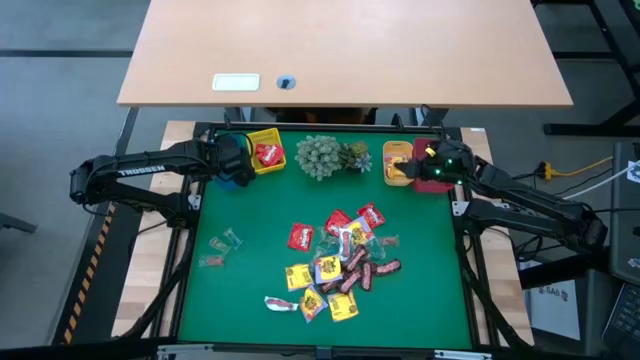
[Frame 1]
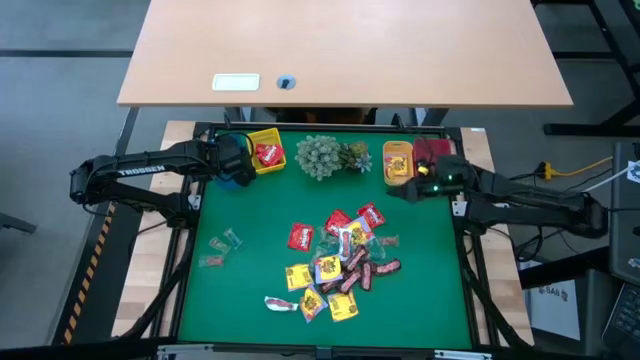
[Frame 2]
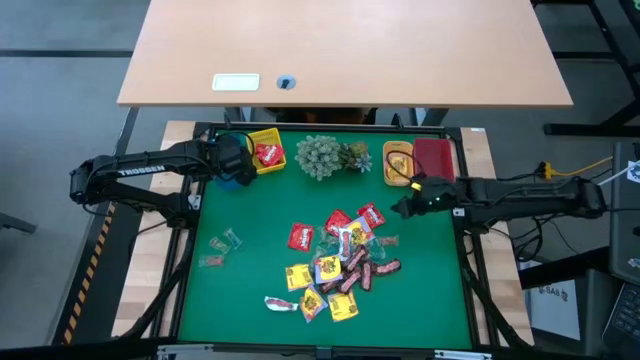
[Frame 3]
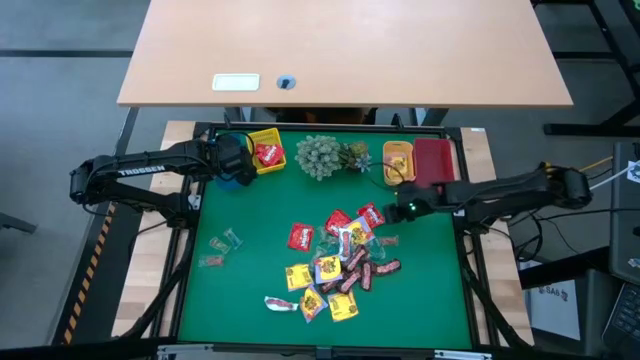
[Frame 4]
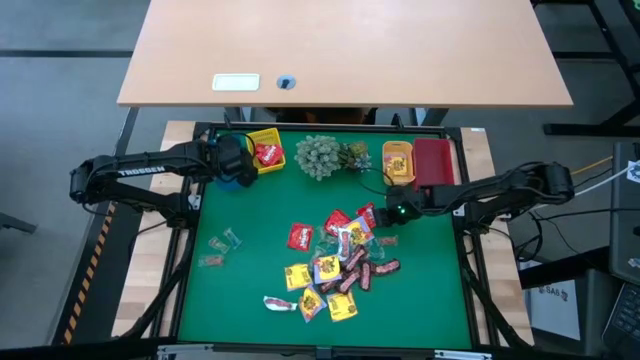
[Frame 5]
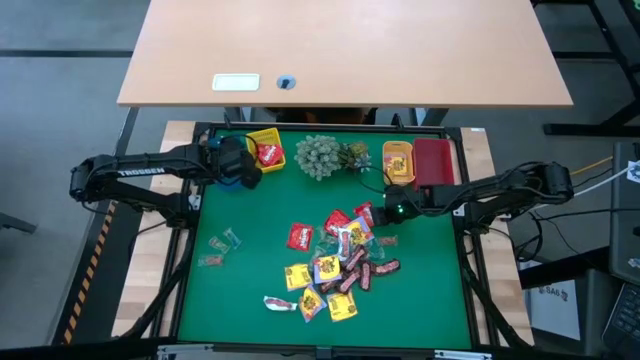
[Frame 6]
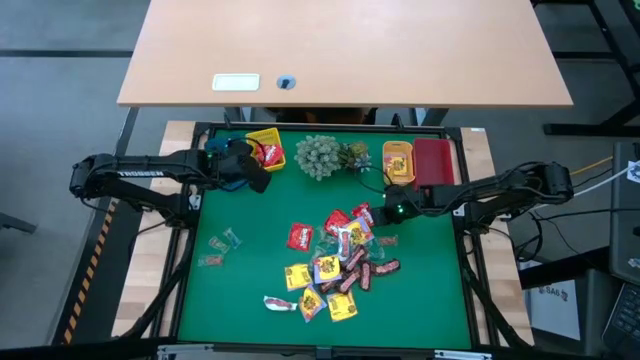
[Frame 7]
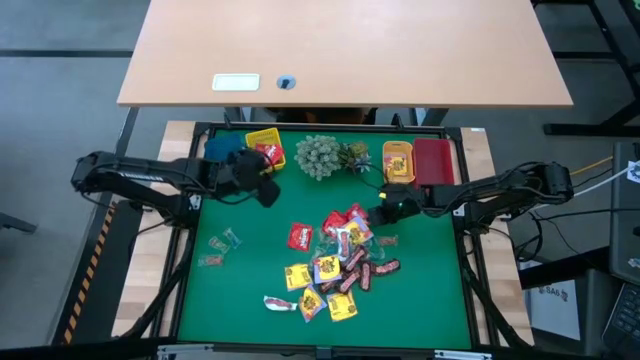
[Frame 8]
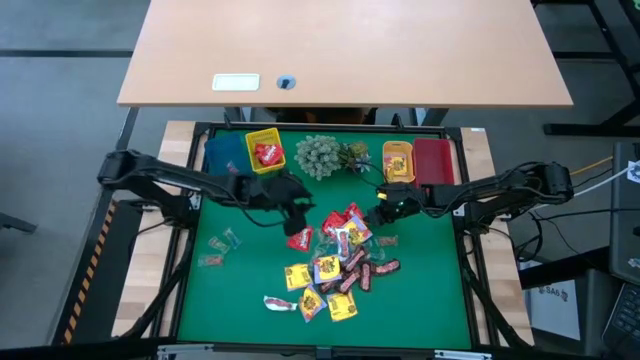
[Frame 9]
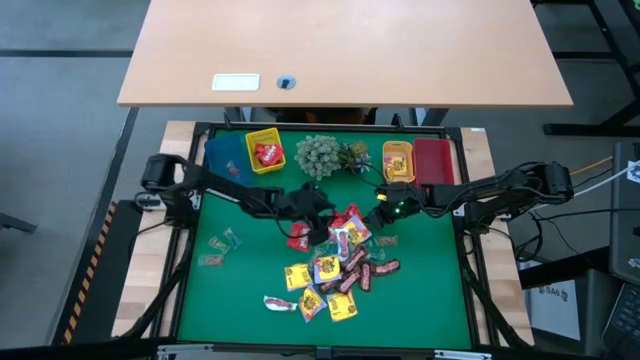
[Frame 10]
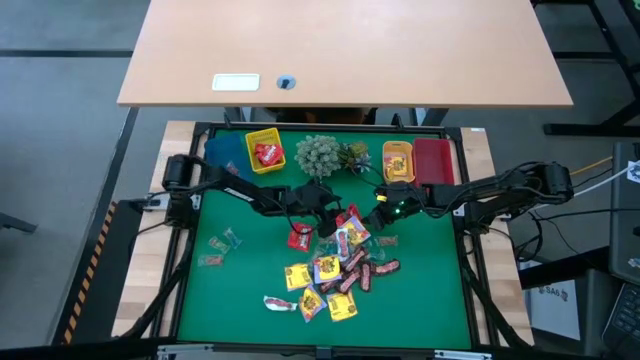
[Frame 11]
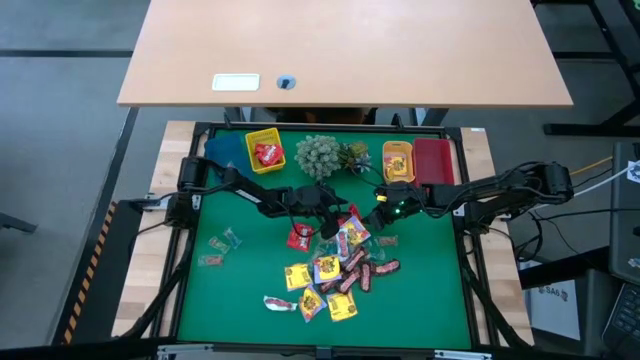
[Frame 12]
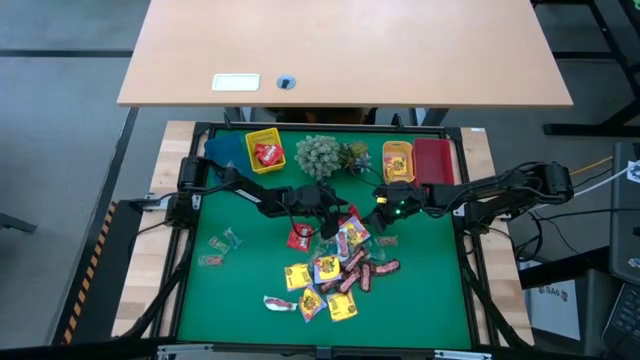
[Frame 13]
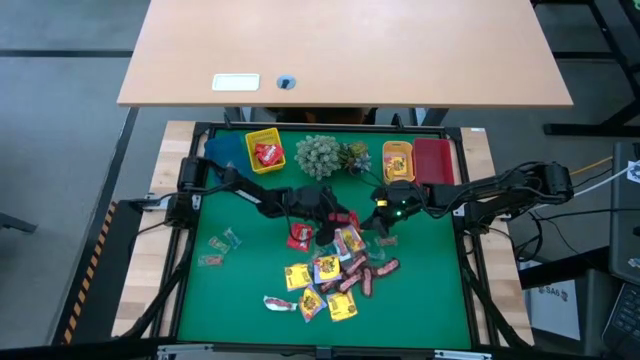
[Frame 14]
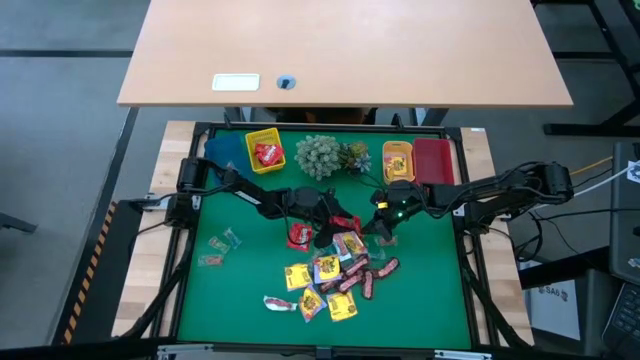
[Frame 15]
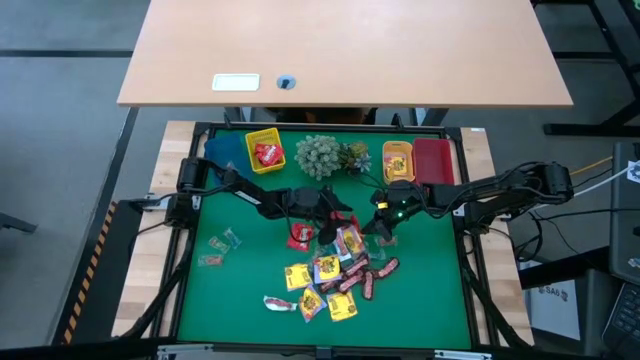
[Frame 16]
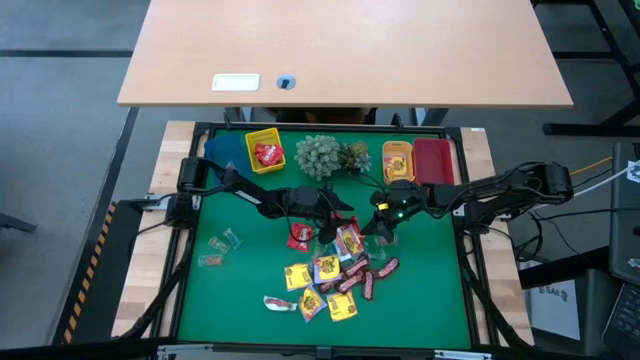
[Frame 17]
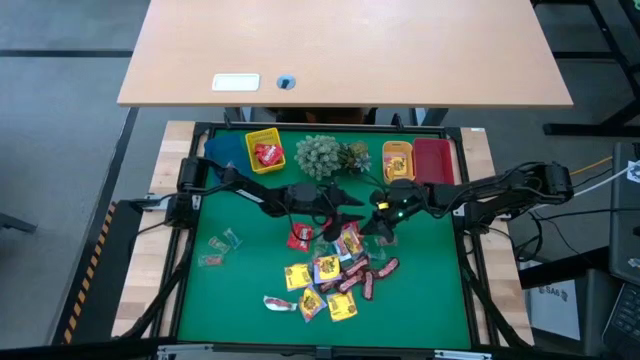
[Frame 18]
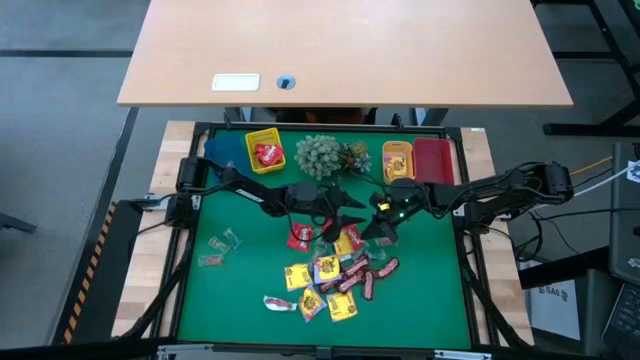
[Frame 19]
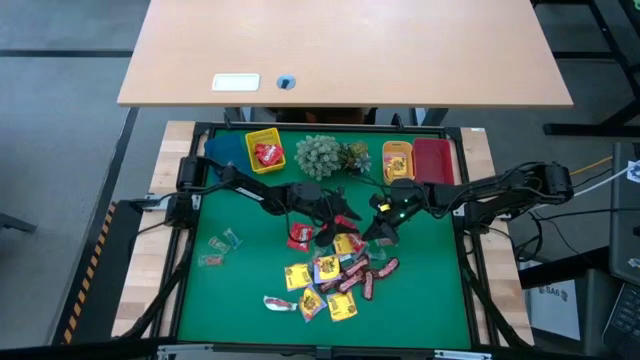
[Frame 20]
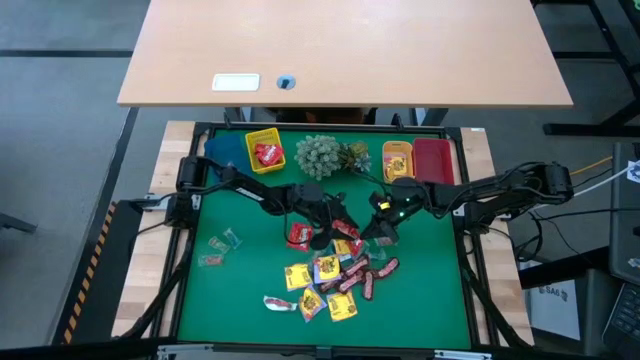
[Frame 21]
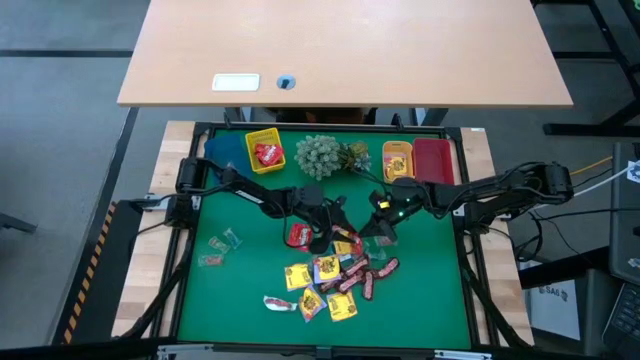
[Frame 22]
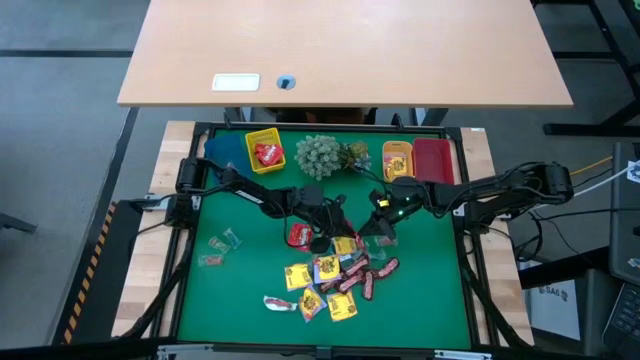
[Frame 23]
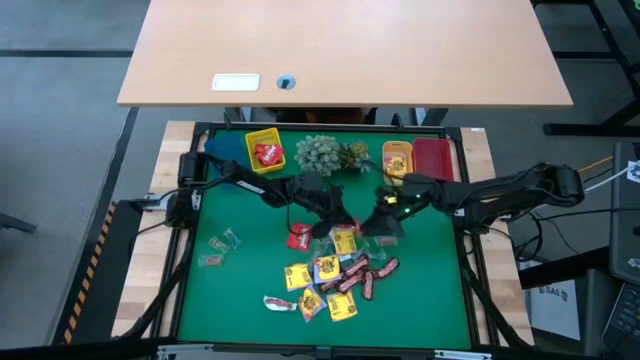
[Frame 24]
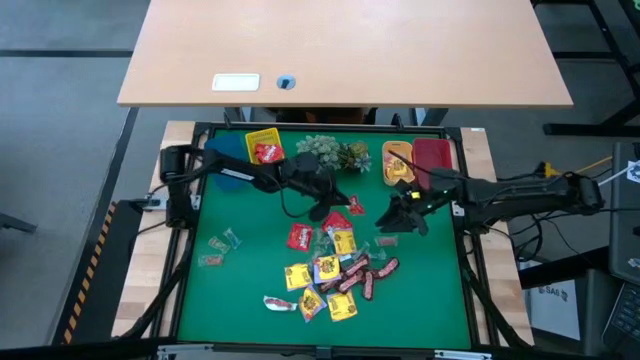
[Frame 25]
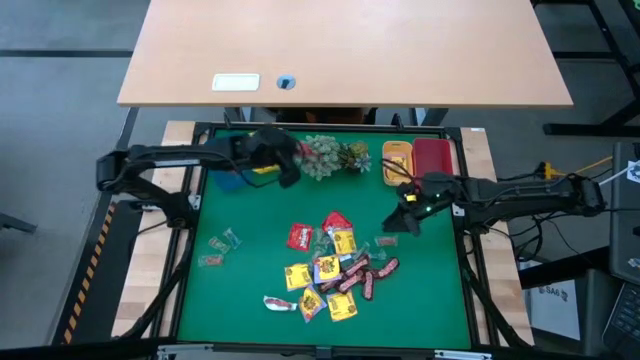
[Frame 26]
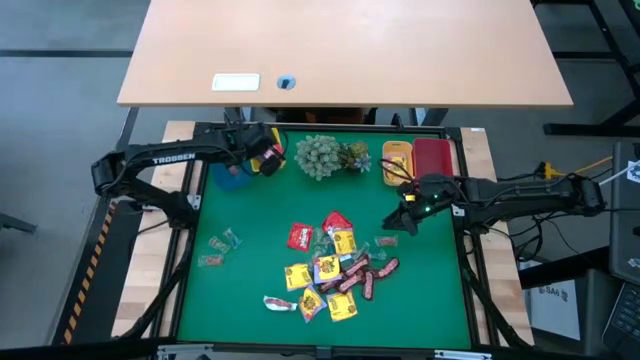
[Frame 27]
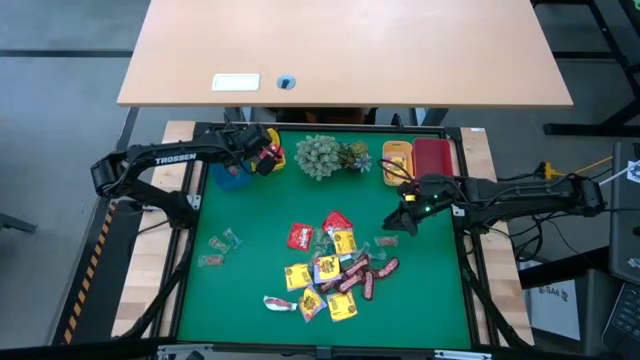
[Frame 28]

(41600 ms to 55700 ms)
Task: Sort candy
Put the red candy into the yellow bin

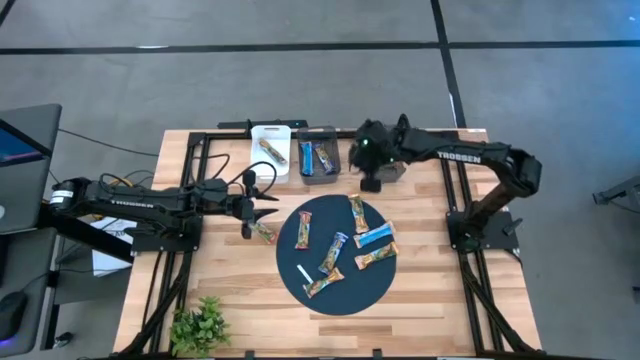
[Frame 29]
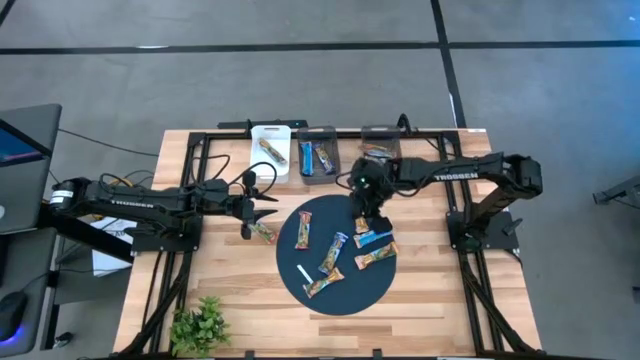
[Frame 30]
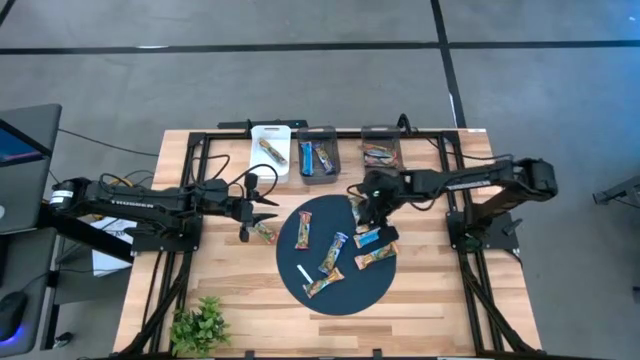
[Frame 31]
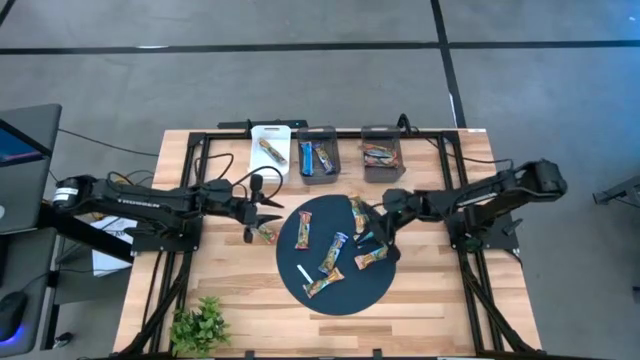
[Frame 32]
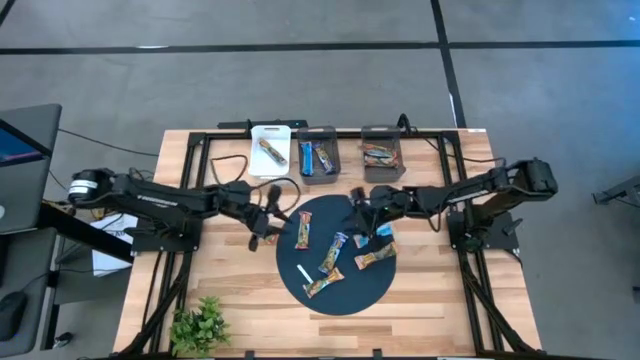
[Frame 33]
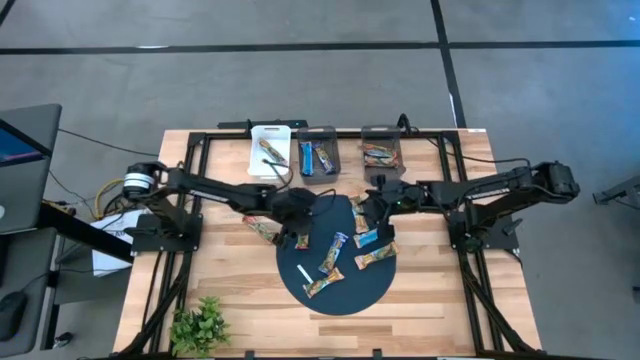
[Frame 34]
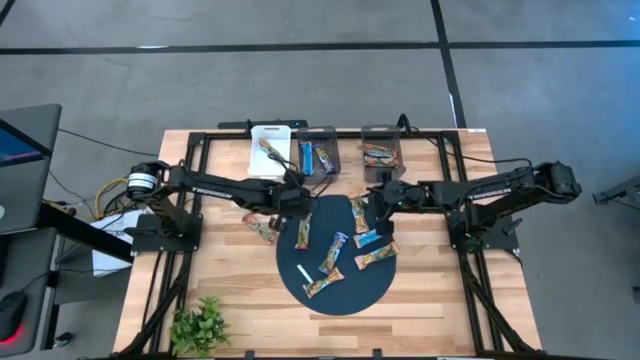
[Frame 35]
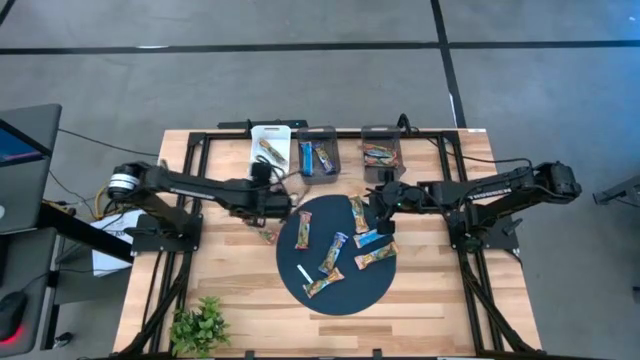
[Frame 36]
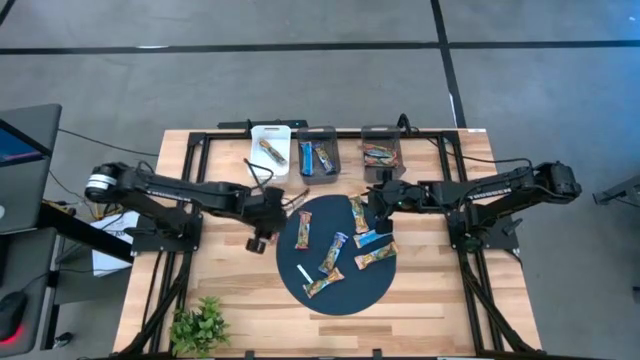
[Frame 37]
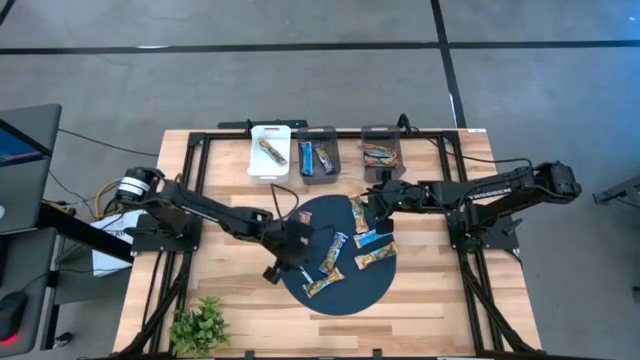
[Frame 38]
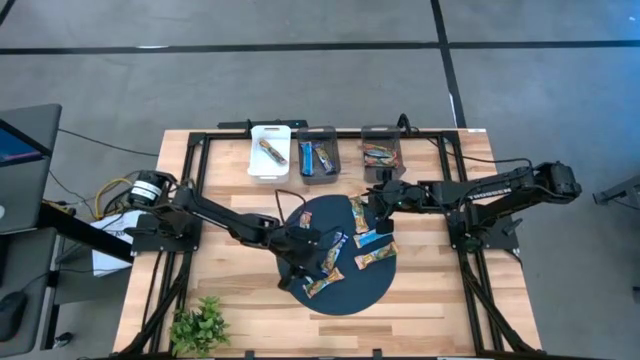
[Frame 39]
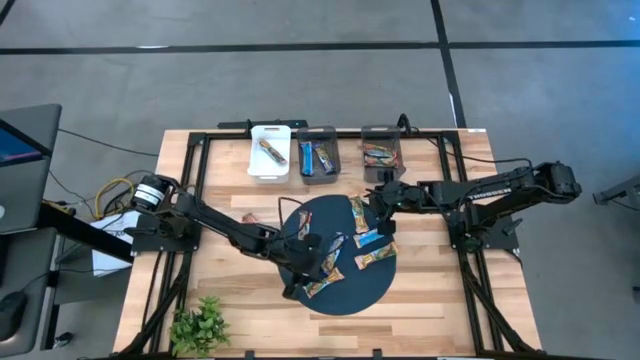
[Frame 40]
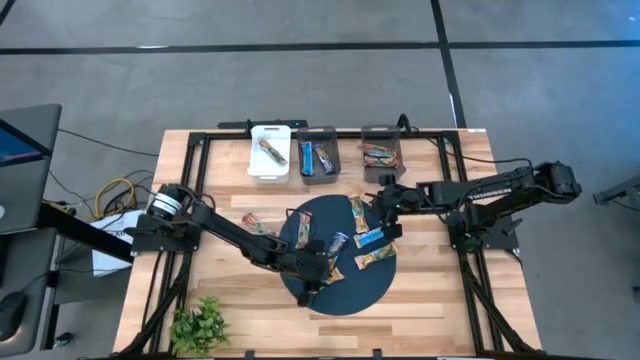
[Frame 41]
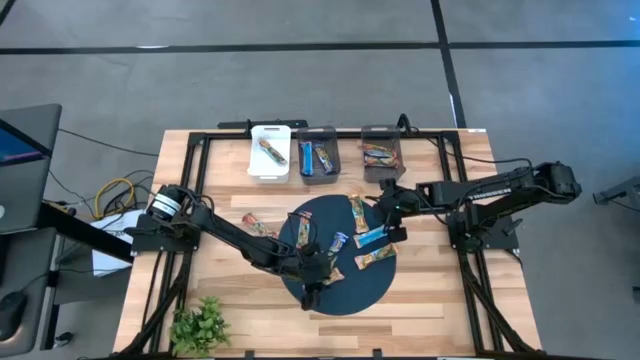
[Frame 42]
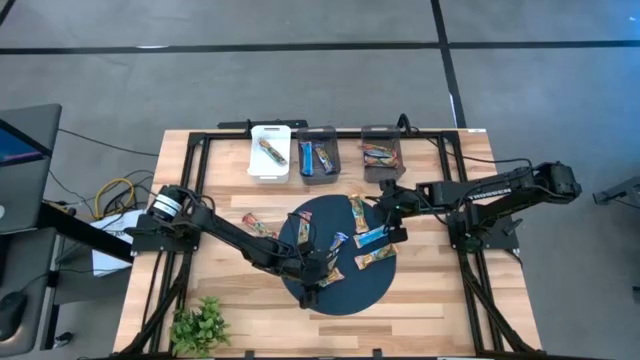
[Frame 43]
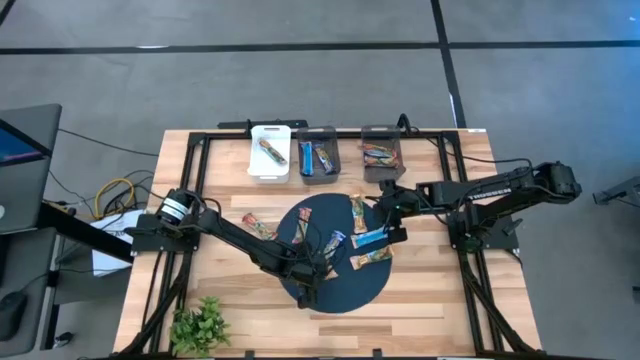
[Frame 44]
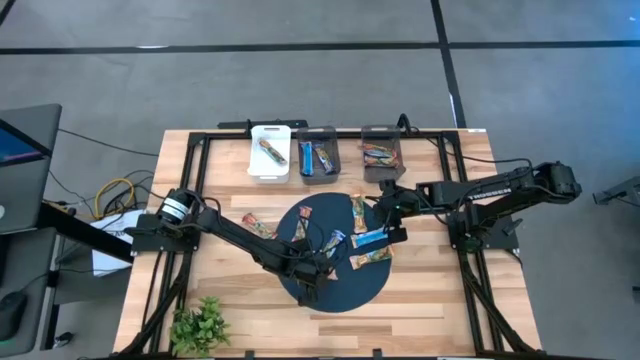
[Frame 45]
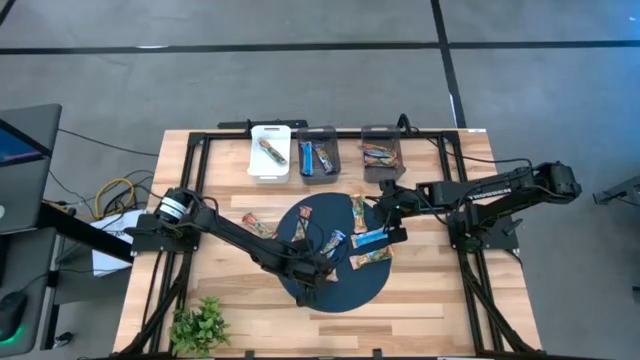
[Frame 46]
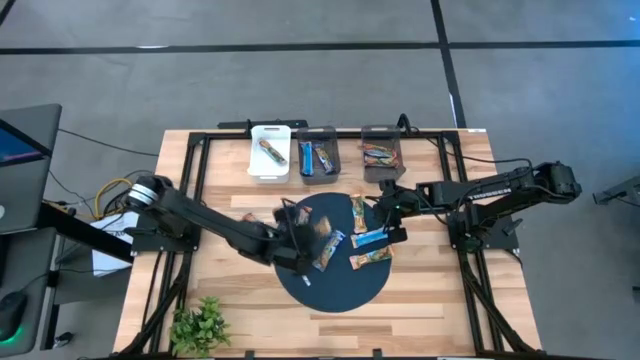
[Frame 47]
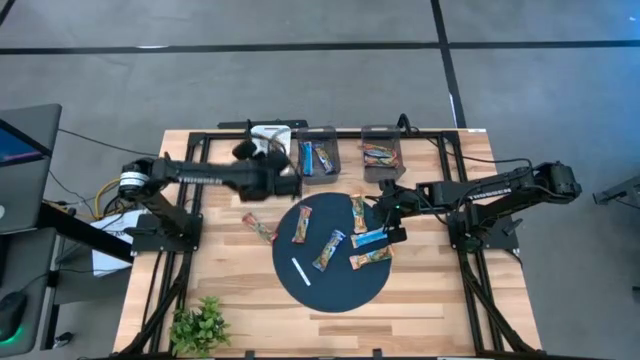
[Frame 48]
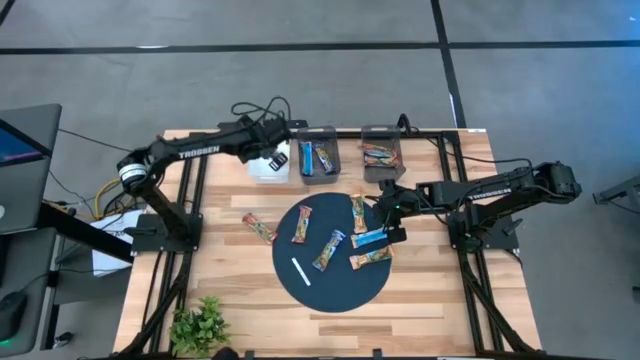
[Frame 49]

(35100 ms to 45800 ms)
Task: Pick and place Granola Bars by type
Put the orange granola bar into the white bin
